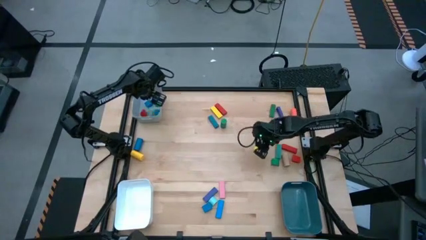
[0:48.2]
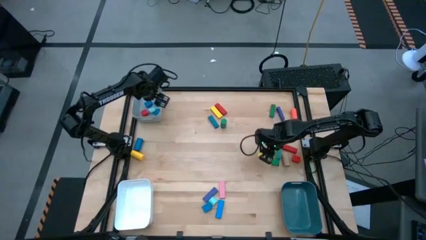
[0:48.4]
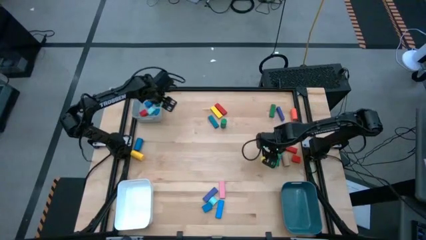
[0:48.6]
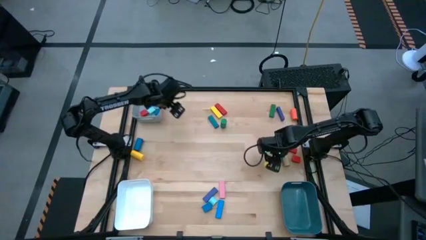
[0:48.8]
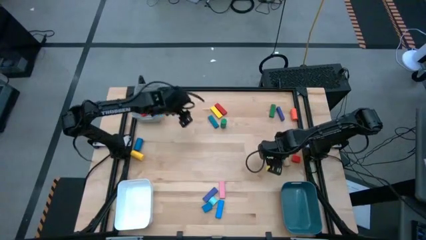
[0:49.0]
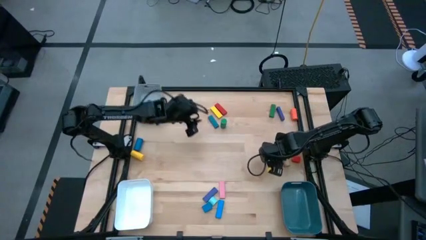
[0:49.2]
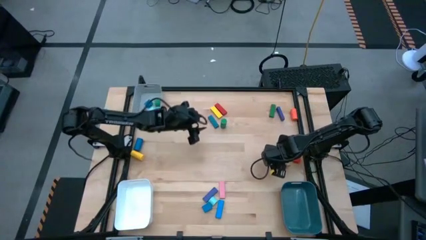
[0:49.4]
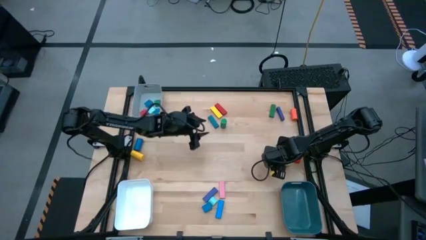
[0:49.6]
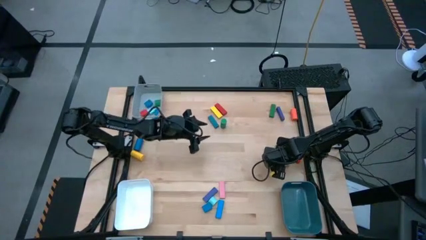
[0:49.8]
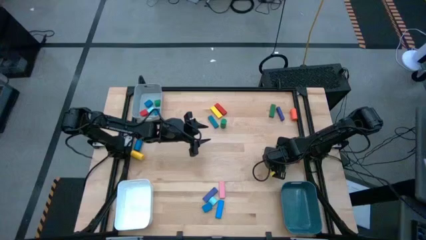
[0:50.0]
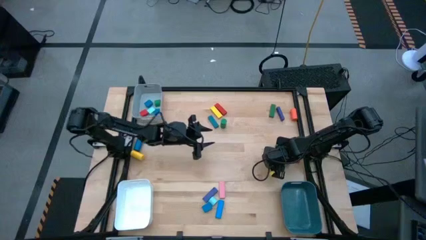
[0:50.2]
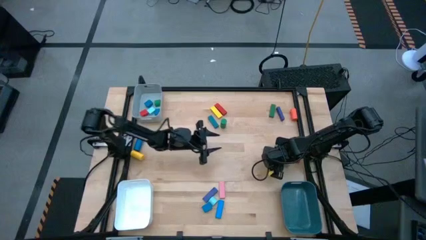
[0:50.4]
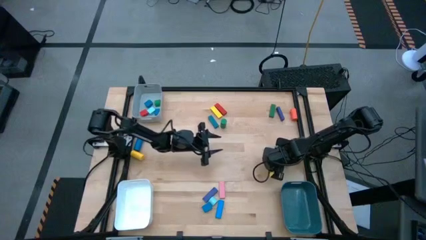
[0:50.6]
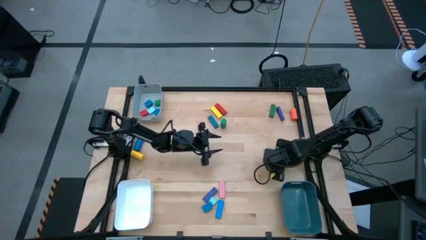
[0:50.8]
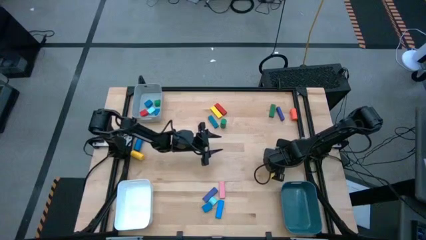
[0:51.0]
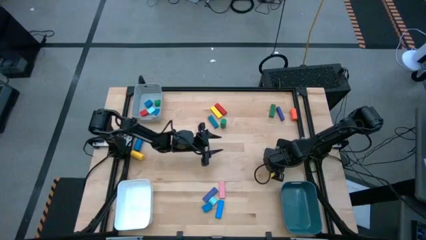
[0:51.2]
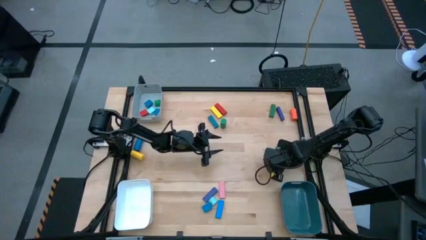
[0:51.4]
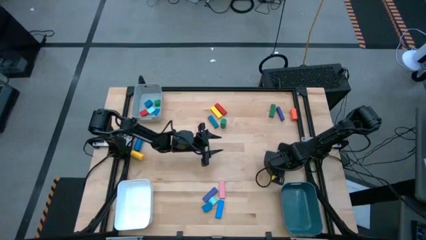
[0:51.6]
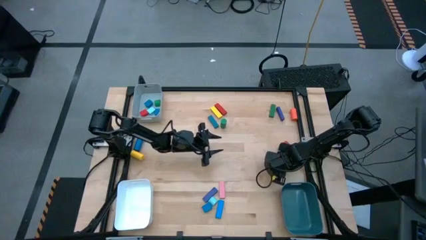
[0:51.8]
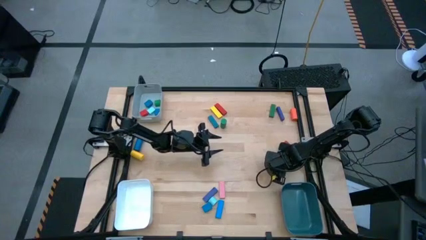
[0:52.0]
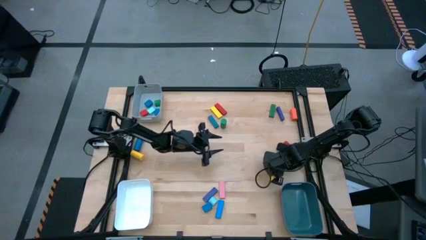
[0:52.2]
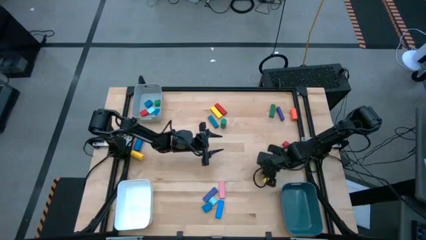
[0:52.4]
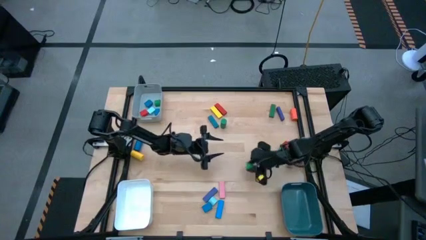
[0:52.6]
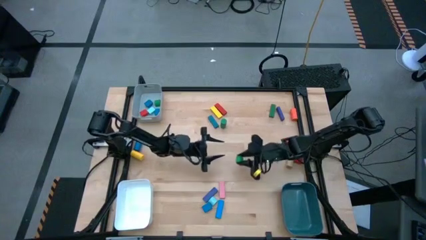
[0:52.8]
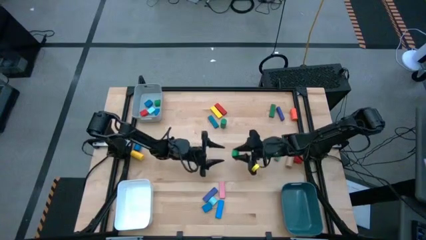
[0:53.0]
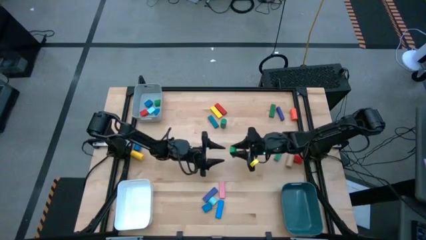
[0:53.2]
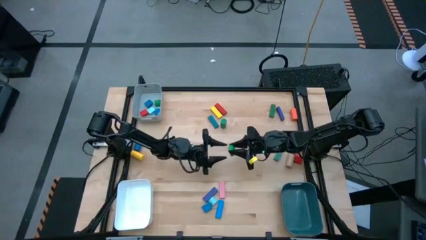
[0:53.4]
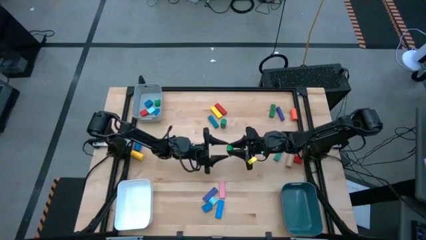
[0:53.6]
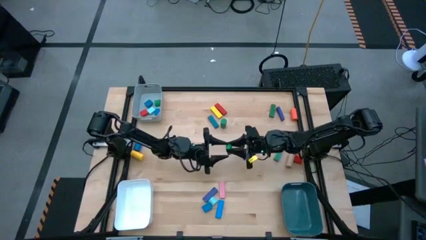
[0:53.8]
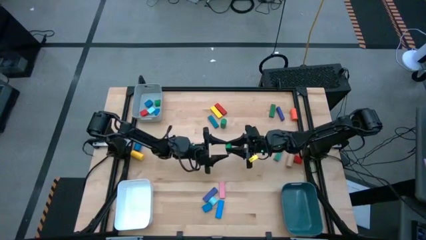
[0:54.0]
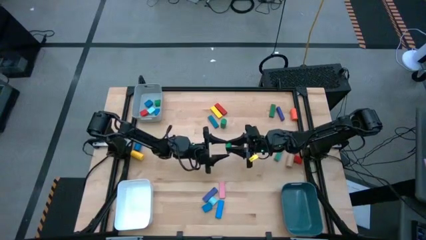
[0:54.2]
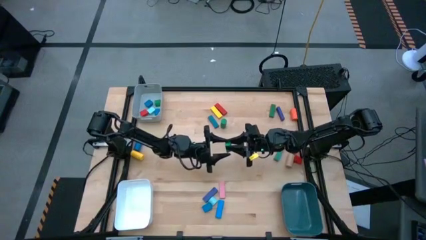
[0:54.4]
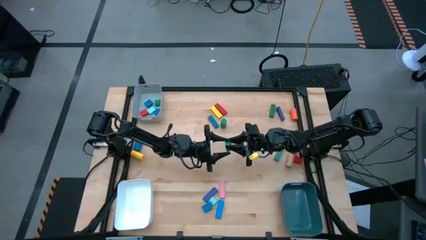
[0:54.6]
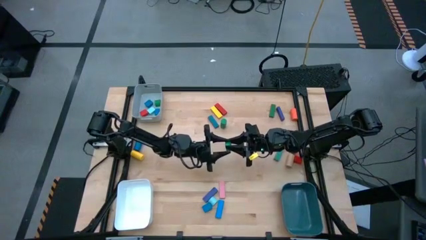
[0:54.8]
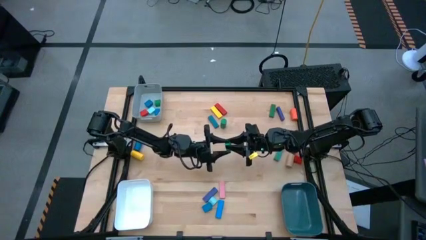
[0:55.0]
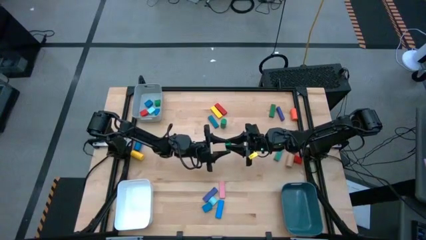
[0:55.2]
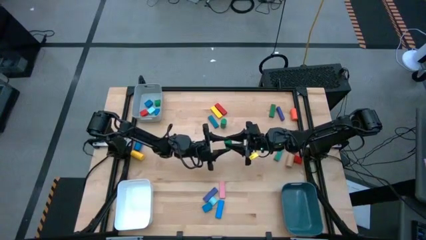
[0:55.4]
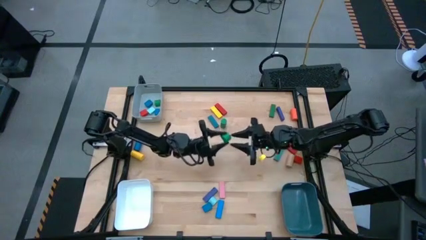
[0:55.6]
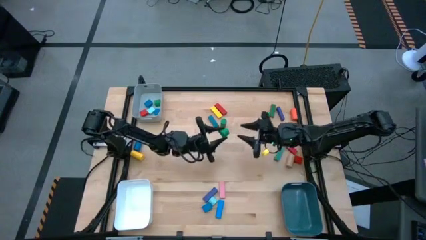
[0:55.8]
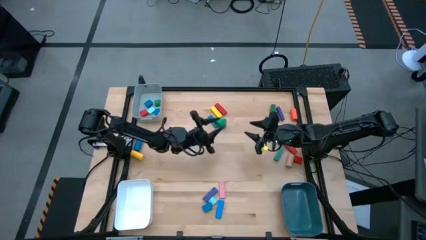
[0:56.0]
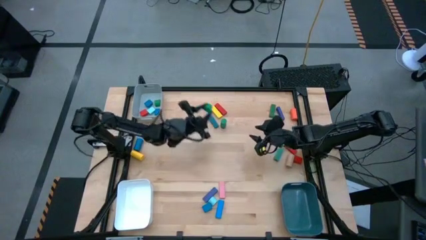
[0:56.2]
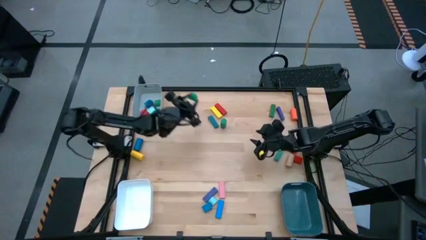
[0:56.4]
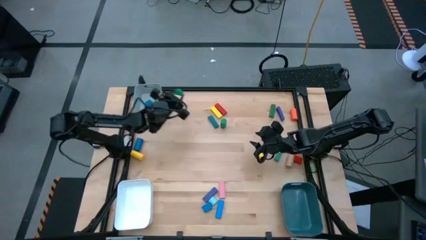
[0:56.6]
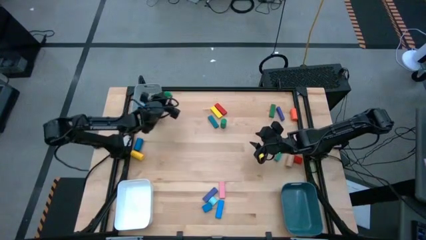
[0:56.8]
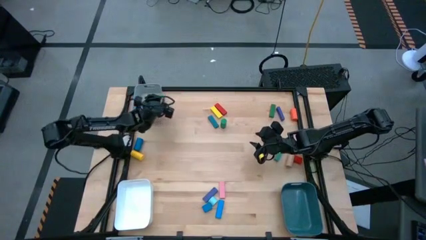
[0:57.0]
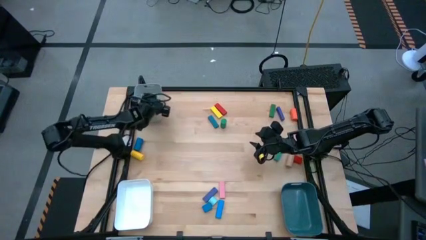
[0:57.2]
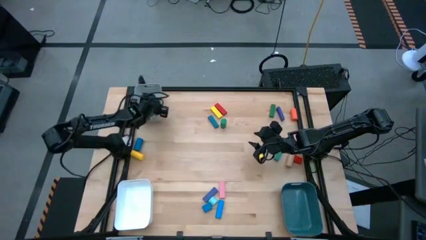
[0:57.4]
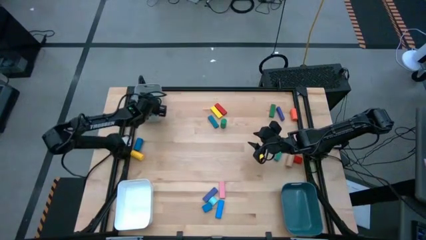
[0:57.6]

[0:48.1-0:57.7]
Task: Sort blocks by size
Put the green half-circle block into the gray bin

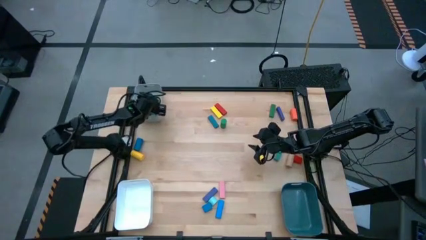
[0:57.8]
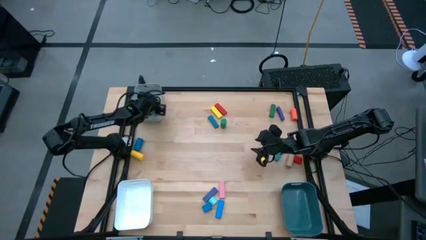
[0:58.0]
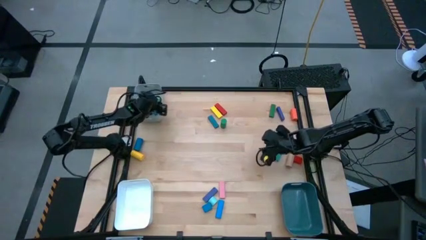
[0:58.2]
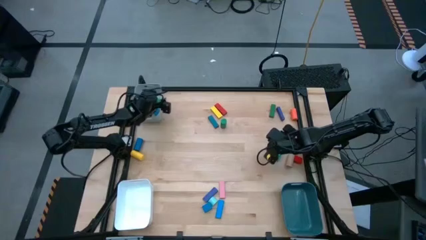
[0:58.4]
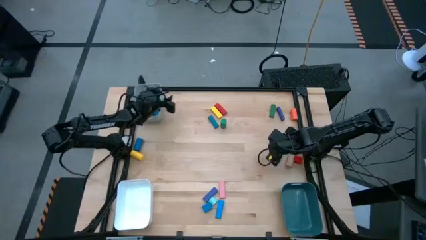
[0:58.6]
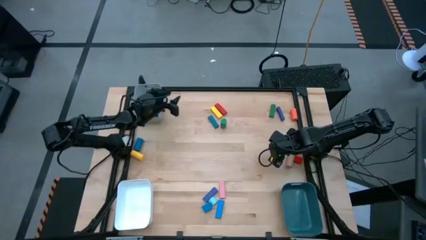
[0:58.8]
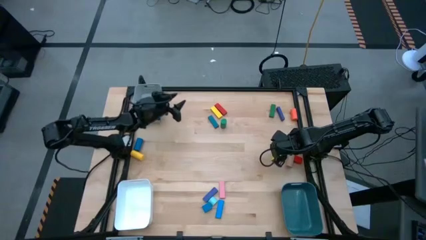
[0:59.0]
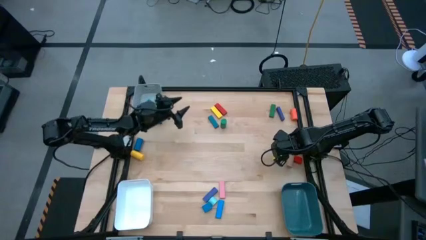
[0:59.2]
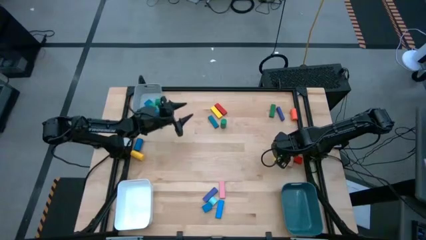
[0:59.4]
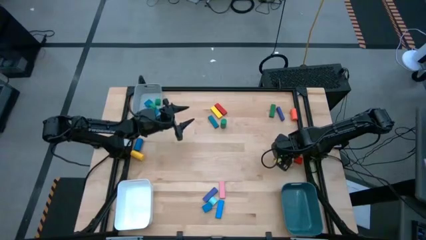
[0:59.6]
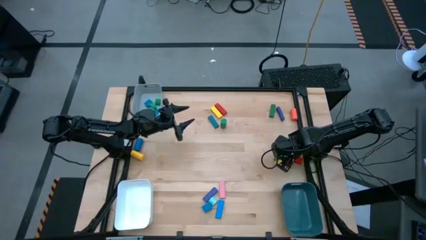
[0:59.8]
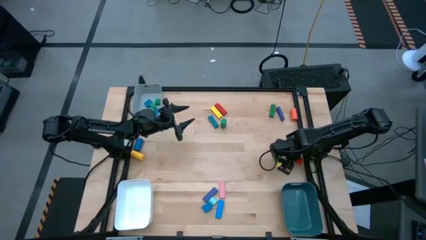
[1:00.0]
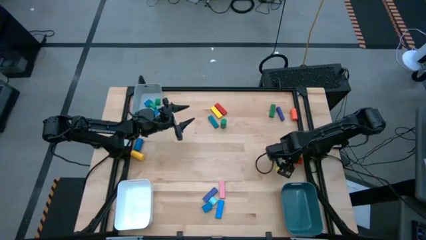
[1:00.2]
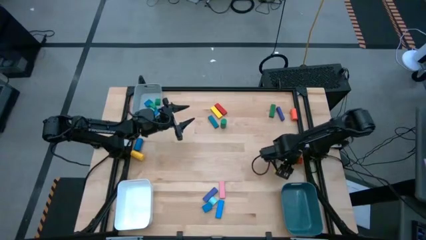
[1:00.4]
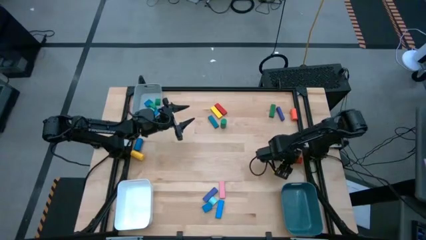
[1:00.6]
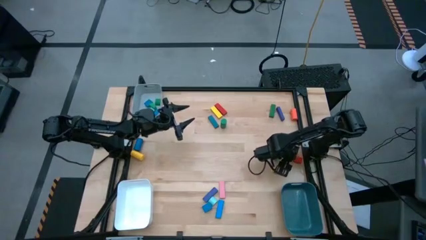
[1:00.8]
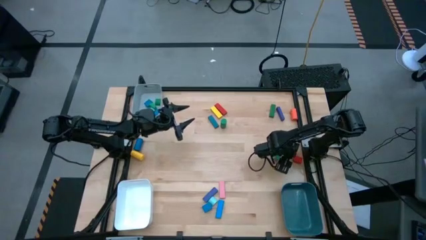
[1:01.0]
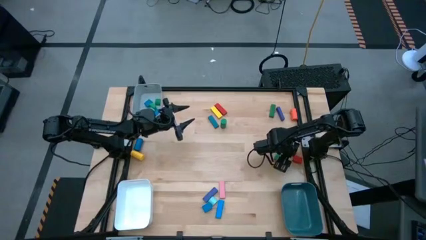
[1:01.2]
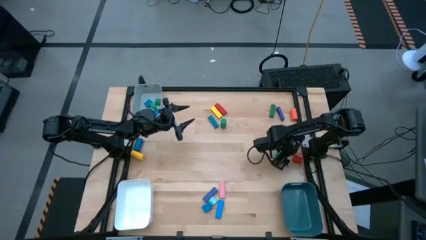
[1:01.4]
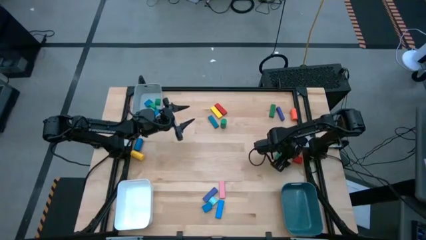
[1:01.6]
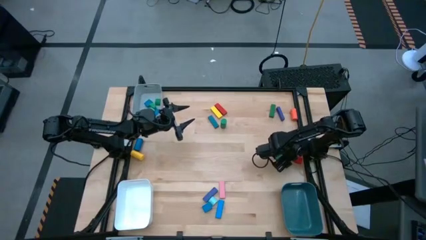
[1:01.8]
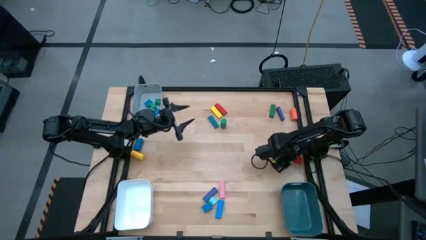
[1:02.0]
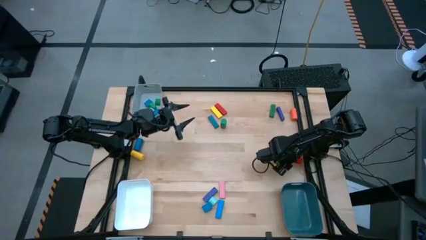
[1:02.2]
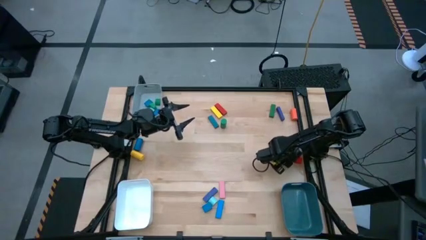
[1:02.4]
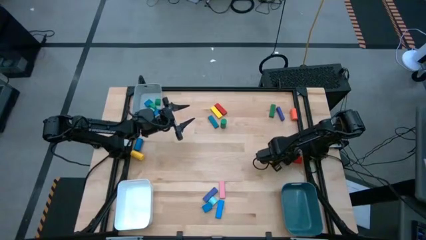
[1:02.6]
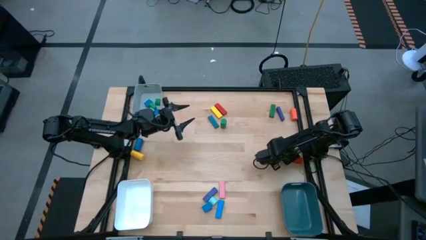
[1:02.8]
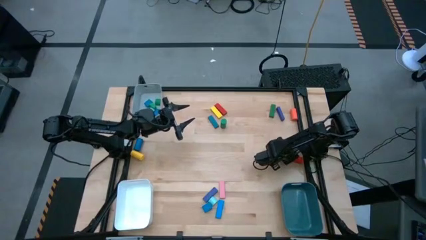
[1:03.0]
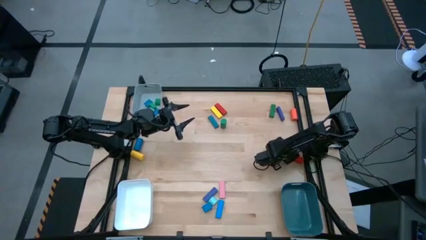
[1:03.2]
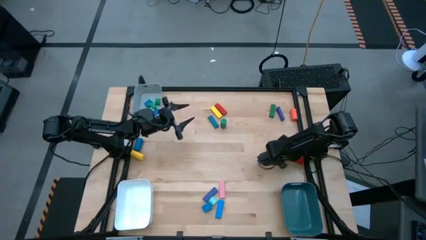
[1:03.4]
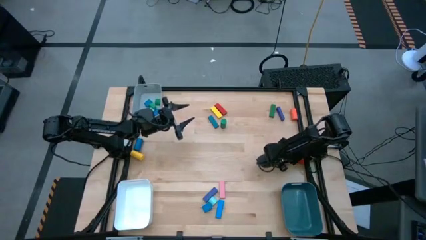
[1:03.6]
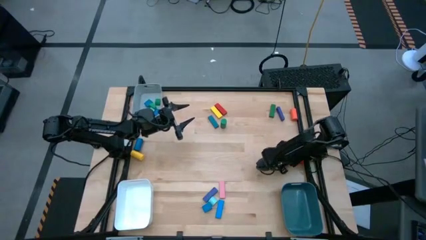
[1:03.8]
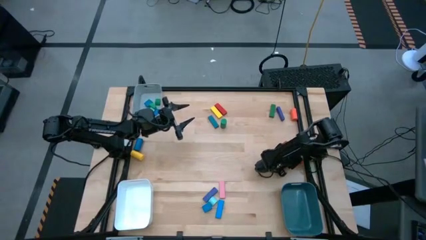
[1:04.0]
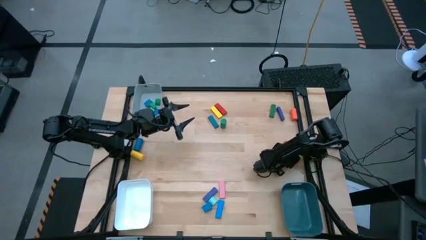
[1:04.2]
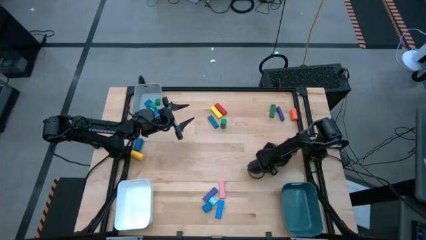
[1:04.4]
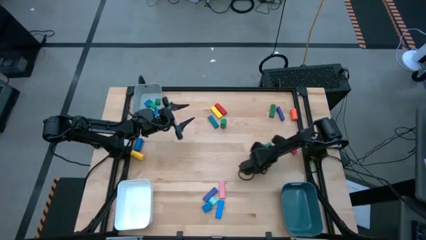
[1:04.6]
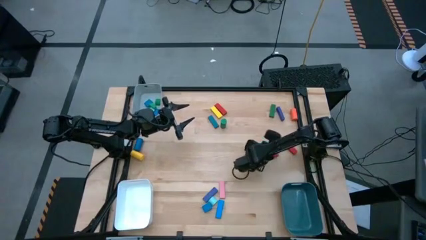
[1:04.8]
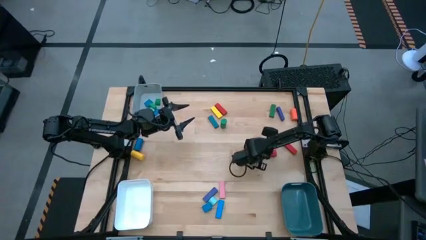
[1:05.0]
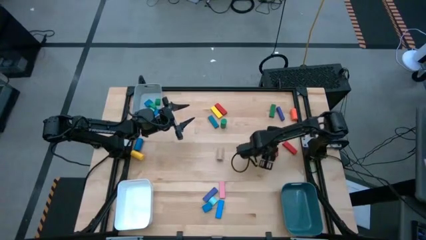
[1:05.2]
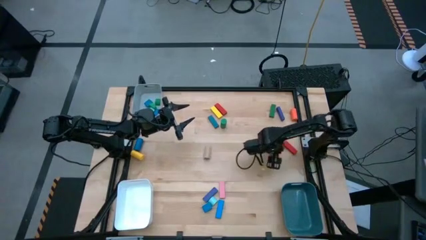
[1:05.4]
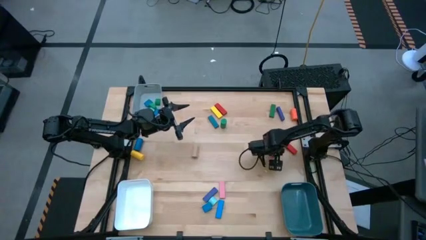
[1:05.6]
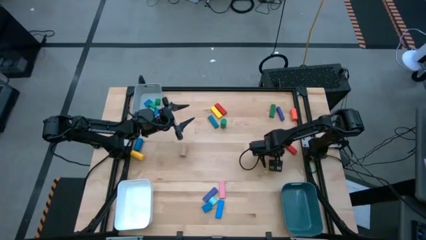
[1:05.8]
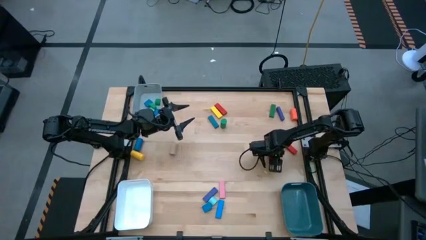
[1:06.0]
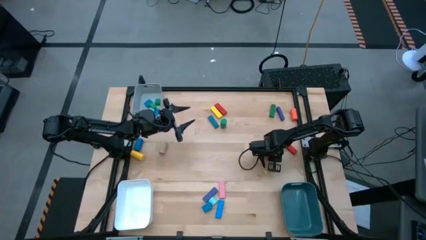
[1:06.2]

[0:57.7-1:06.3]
Put the red half-circle block into the gray bin
